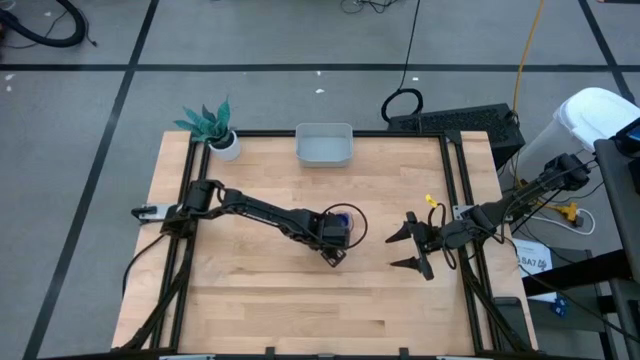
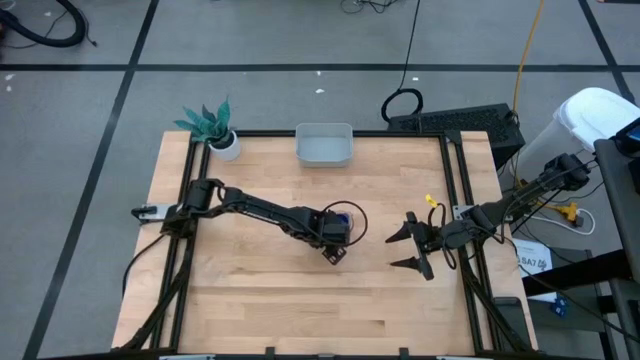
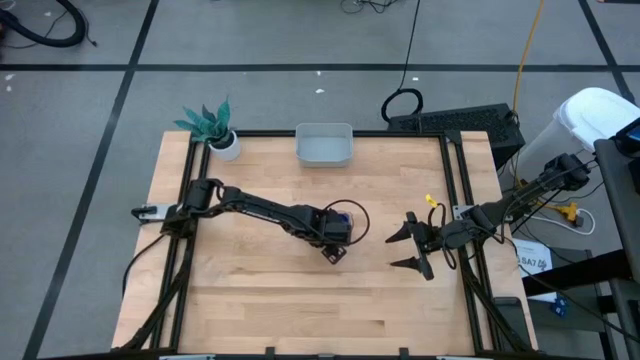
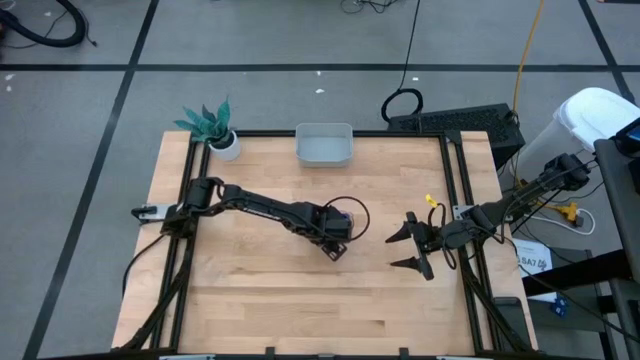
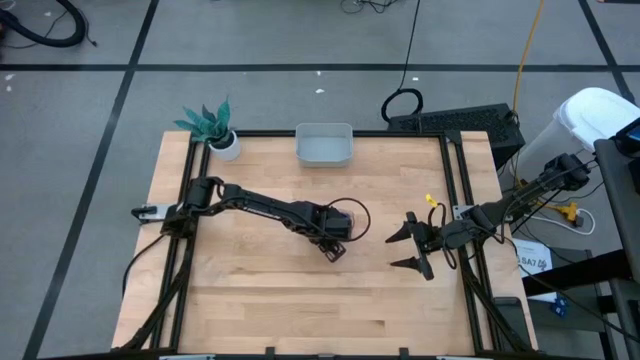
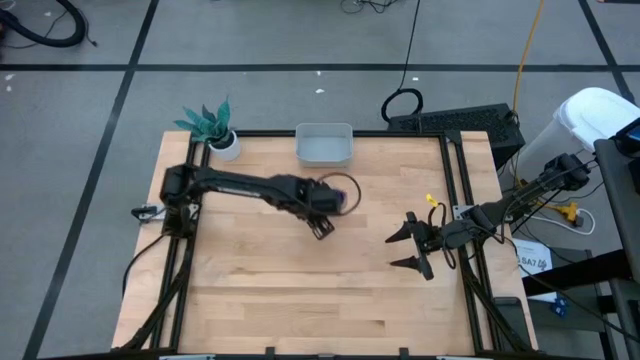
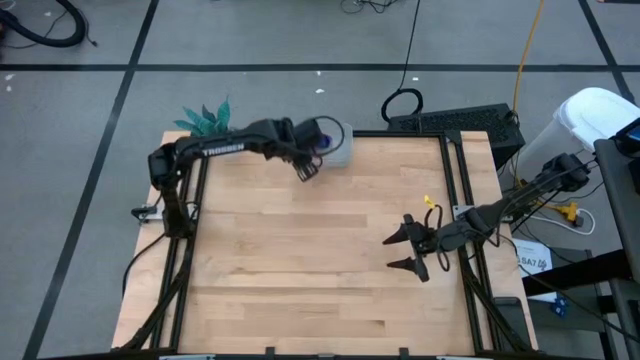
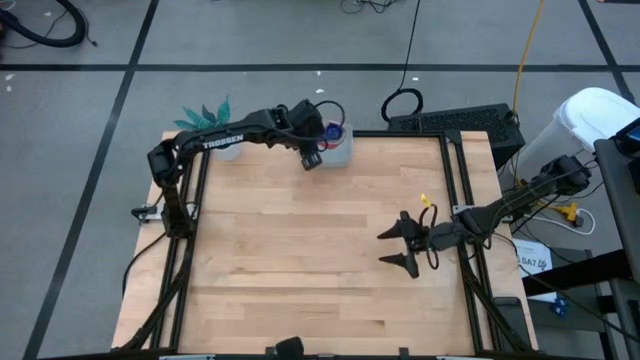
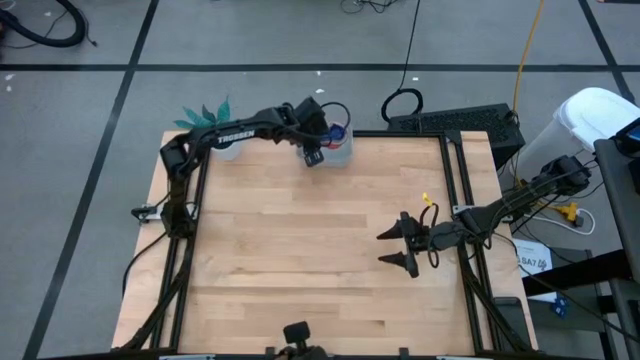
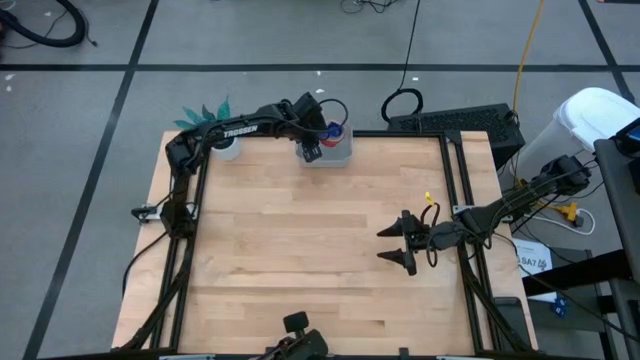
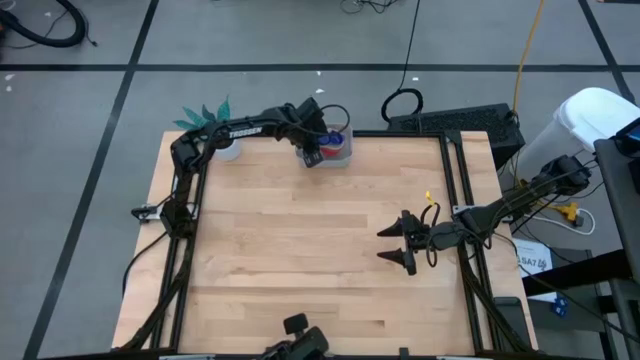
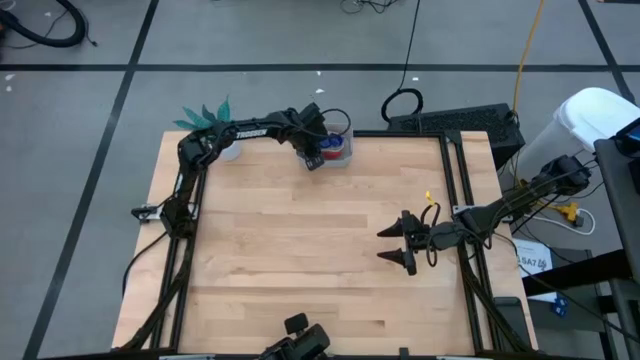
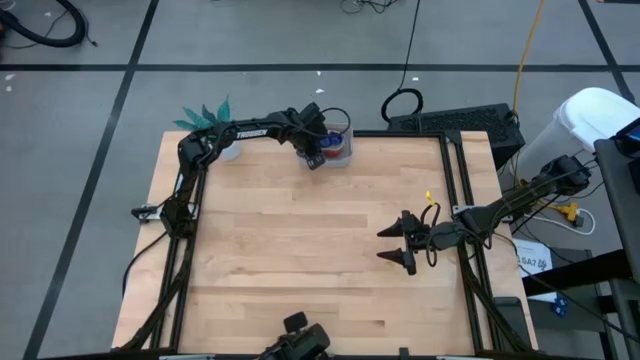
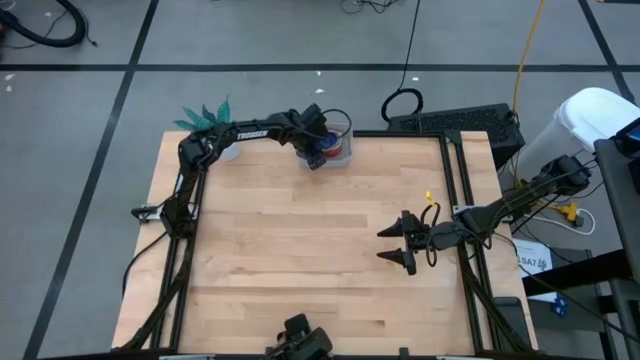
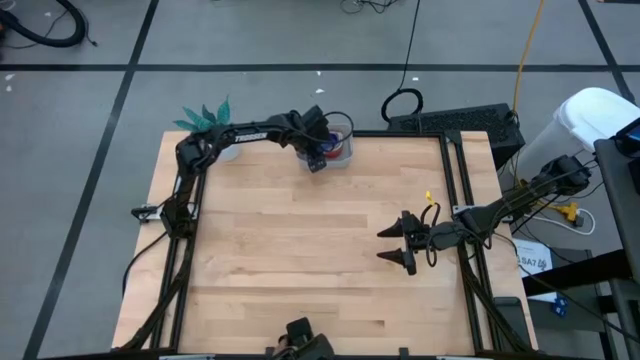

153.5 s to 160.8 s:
Task: Nest measuring cups in basket
Put the nested measuring cups into the gray bin

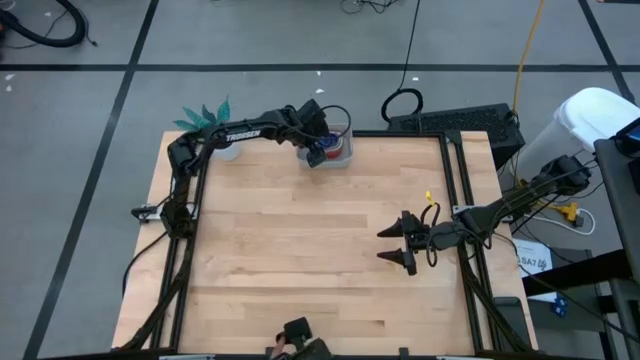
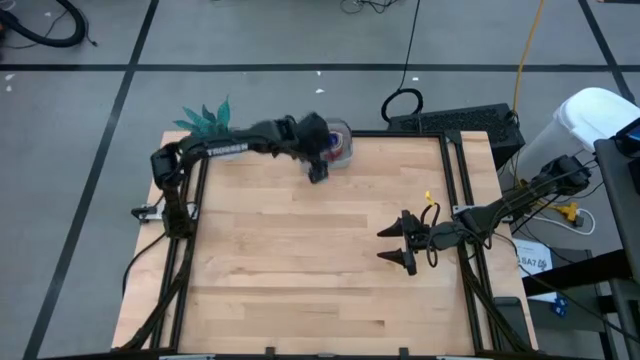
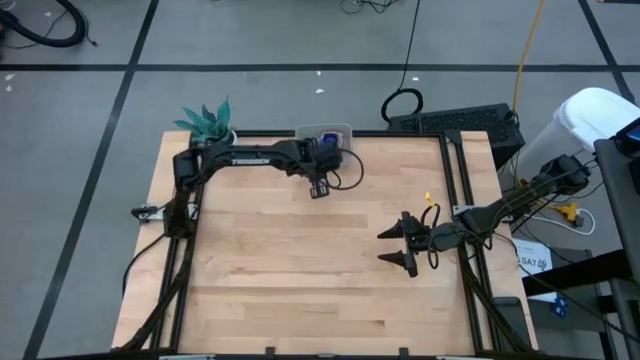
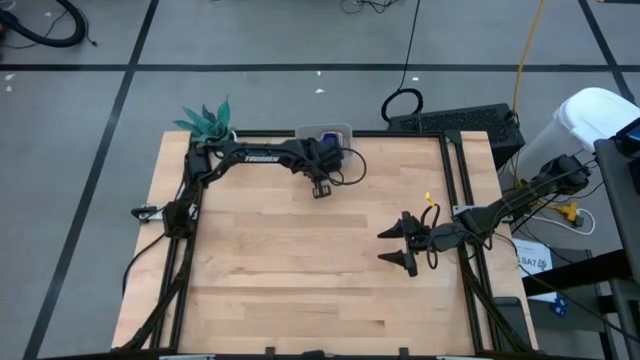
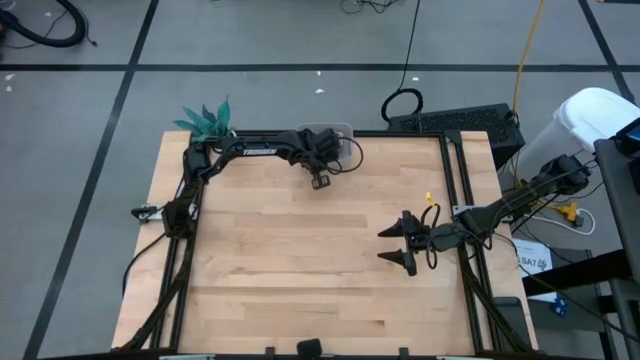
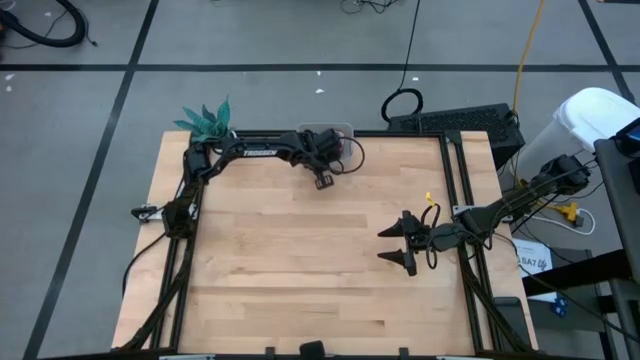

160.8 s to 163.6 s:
Adjust the gray bin

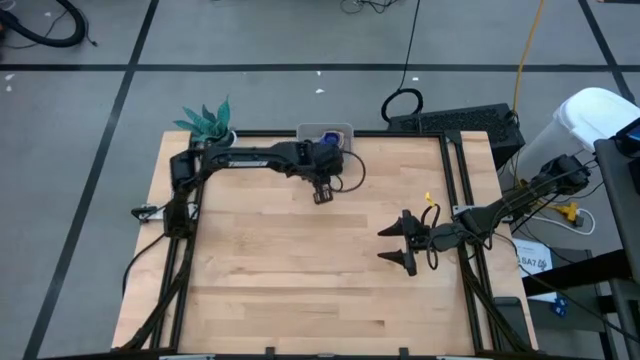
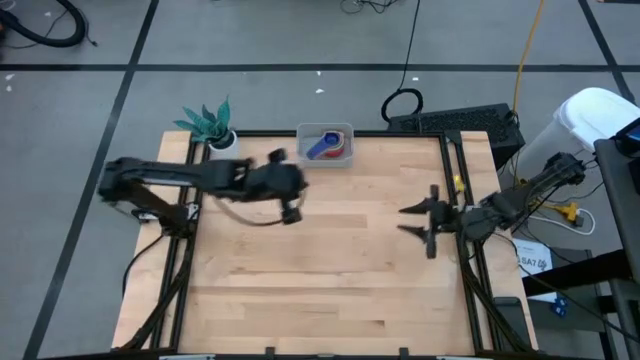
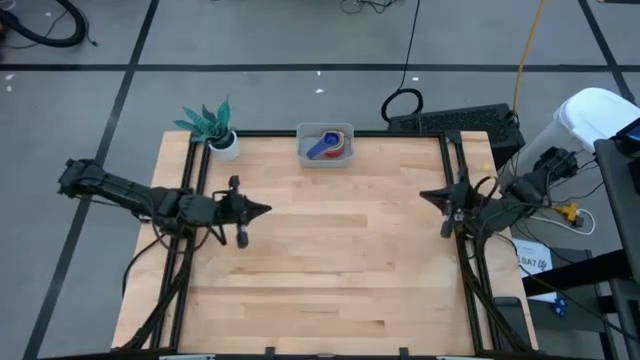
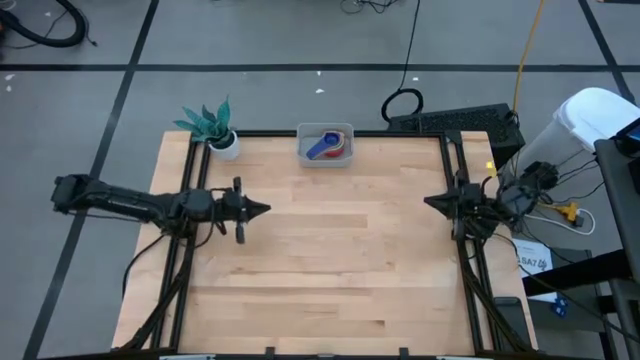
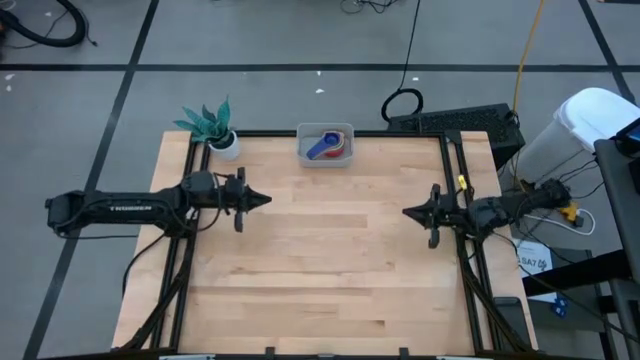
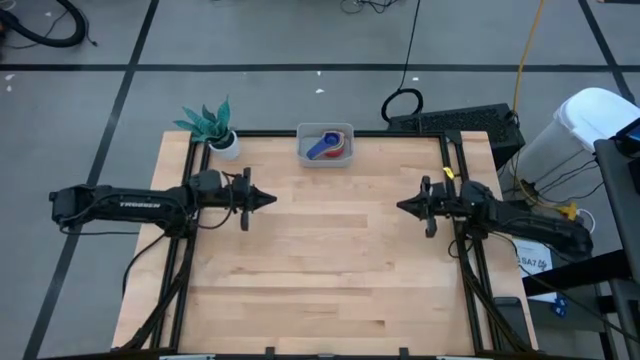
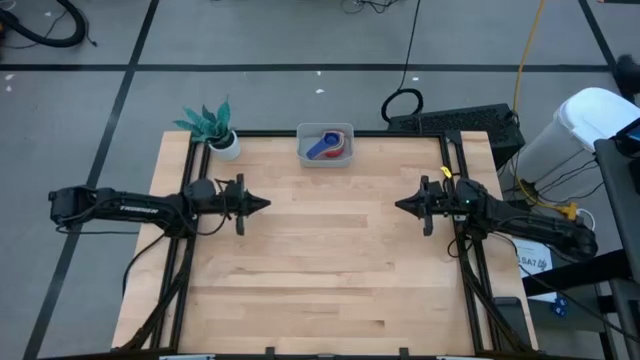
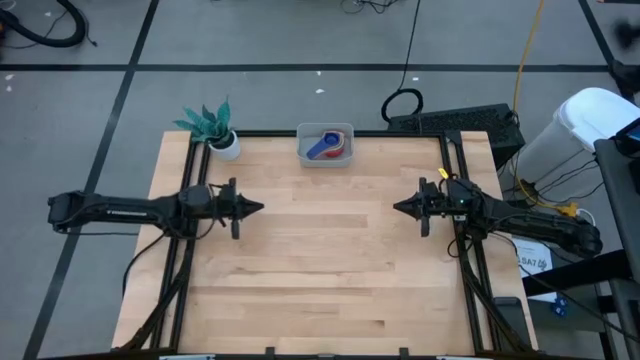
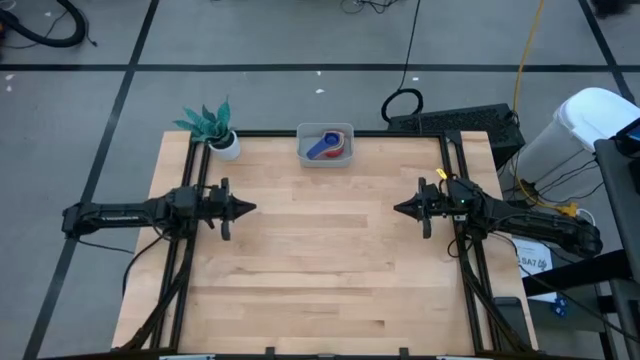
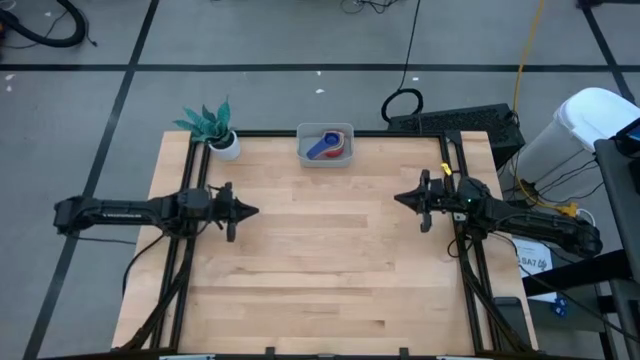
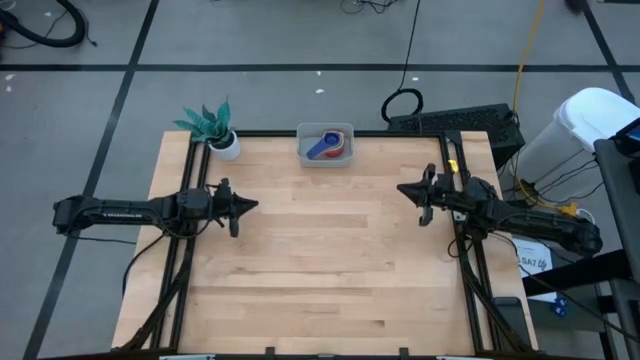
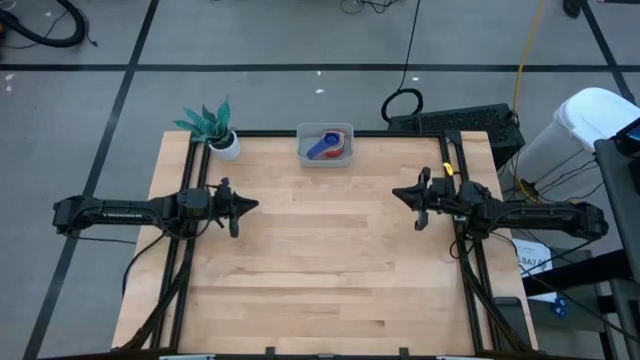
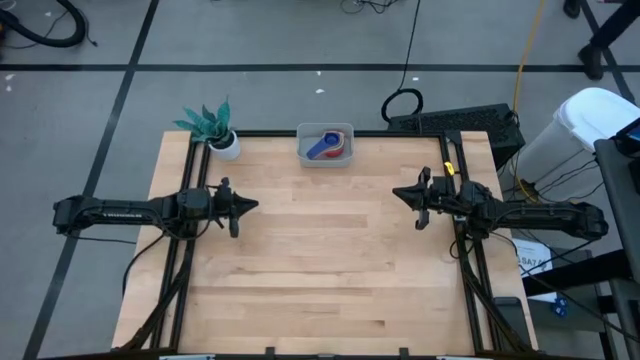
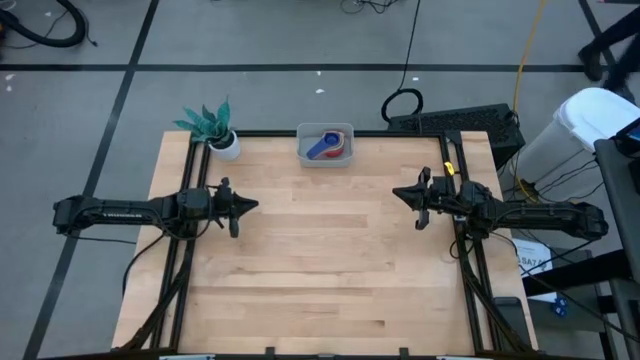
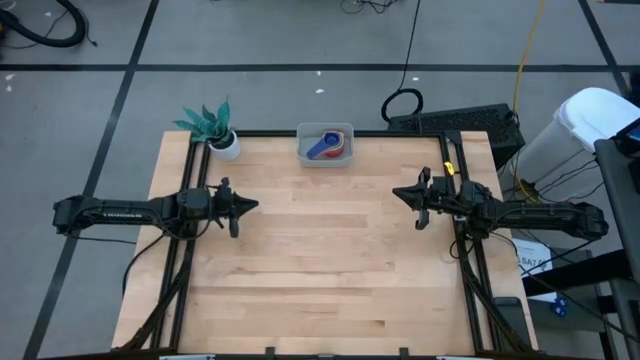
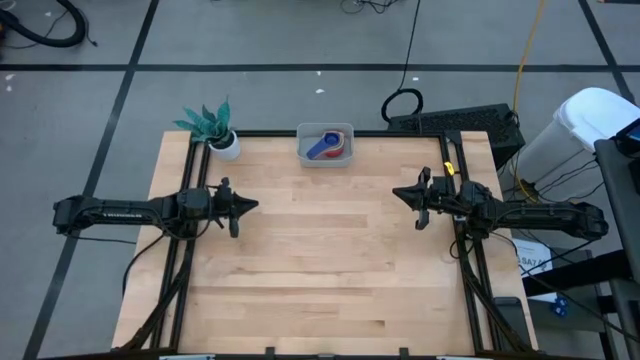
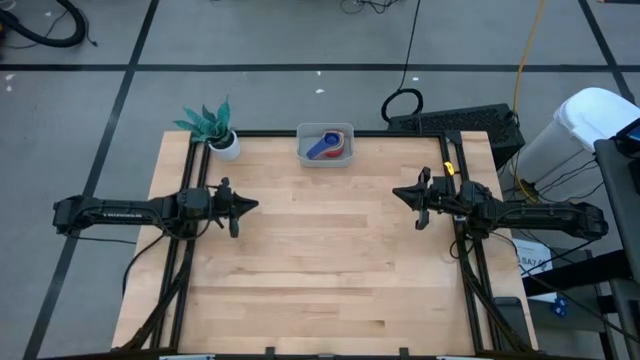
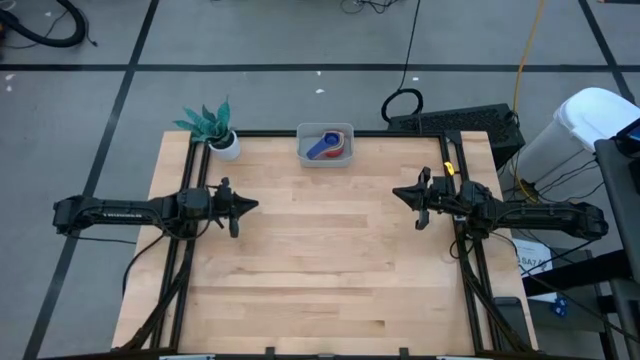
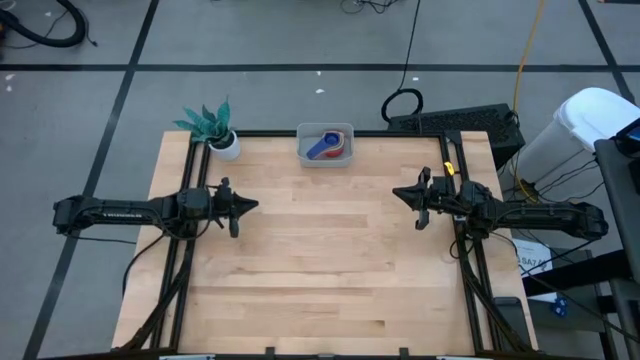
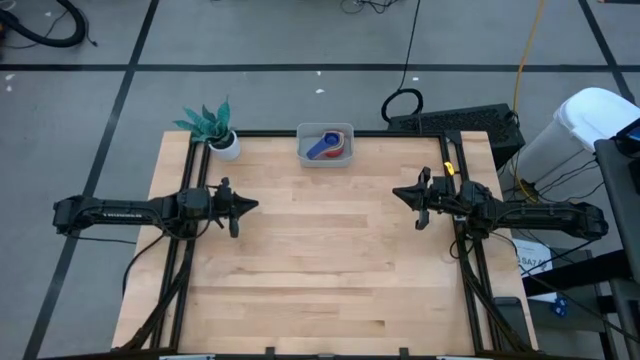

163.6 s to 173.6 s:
Return to Home Position

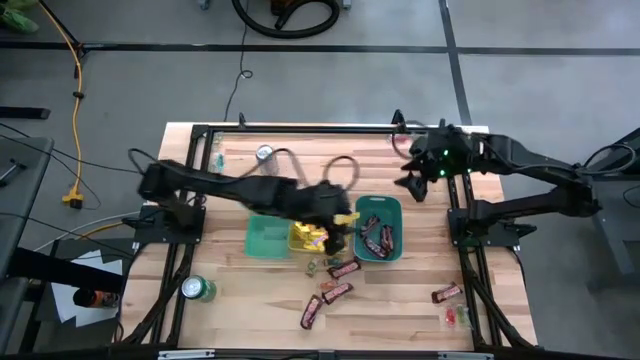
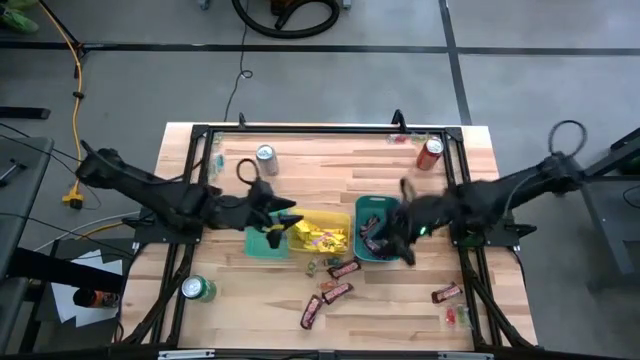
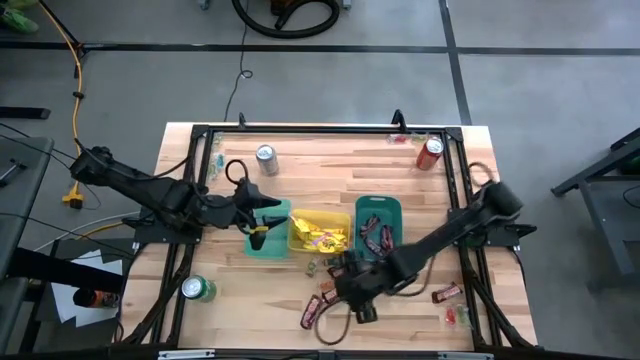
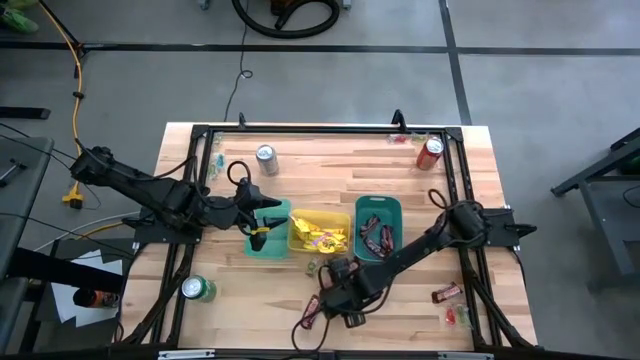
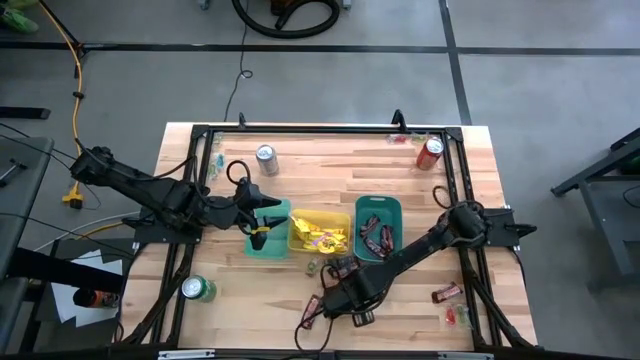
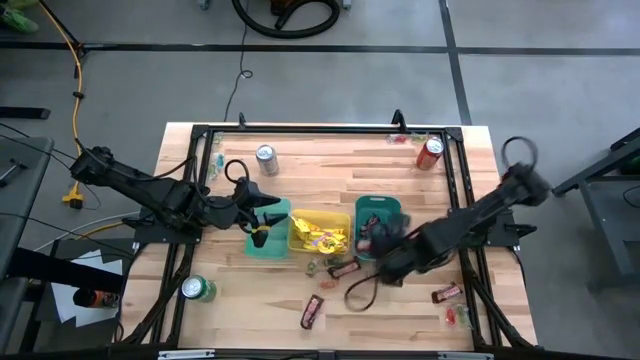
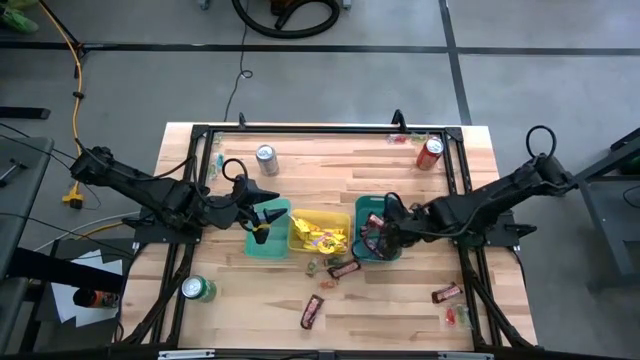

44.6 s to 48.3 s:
Task: Sort candy
Put the brown chocolate bar into the blue bin
